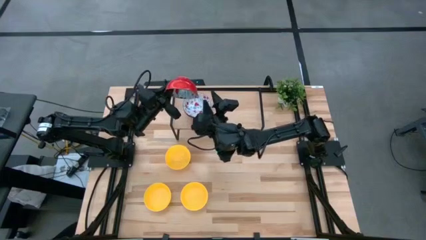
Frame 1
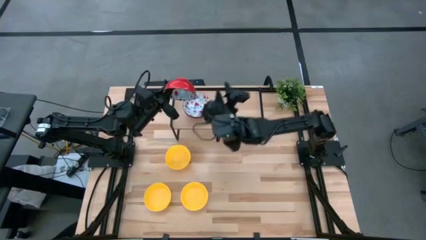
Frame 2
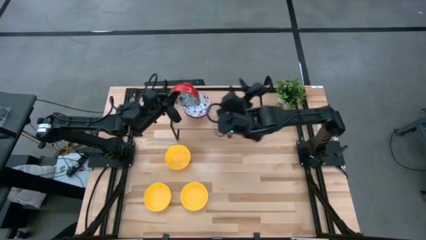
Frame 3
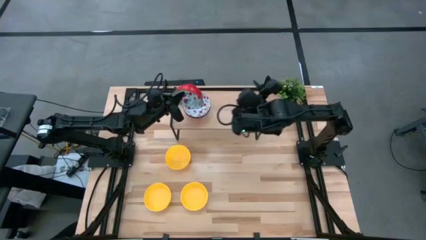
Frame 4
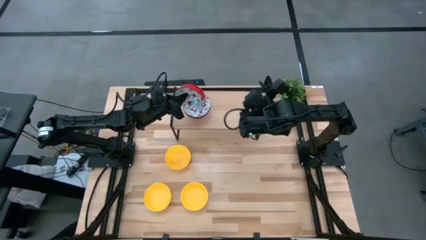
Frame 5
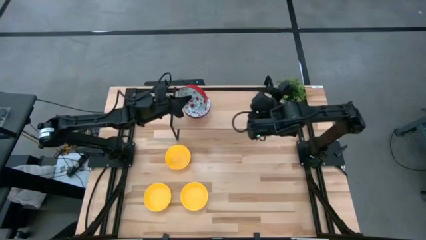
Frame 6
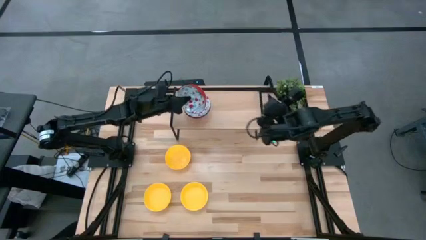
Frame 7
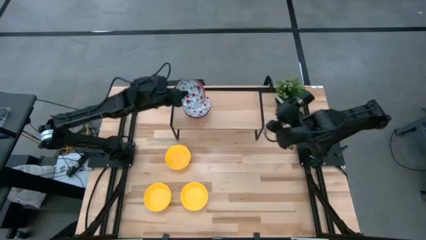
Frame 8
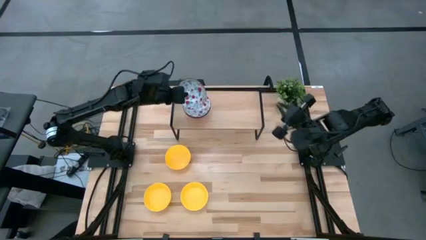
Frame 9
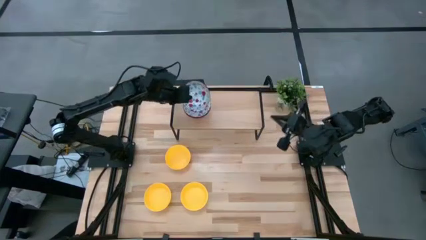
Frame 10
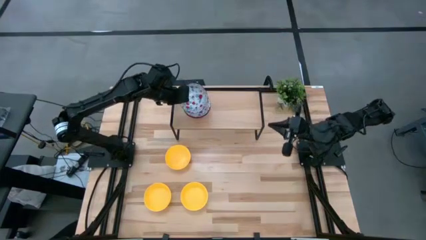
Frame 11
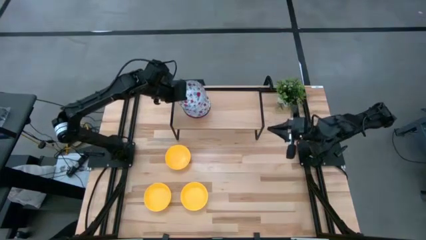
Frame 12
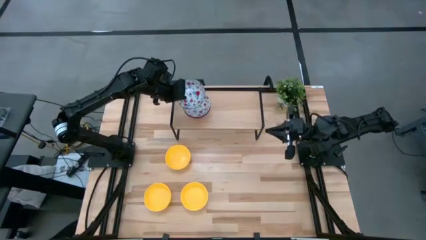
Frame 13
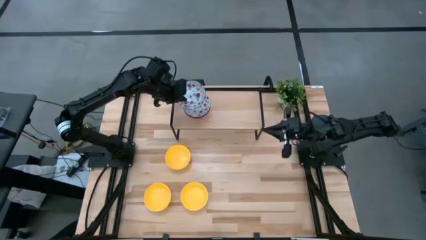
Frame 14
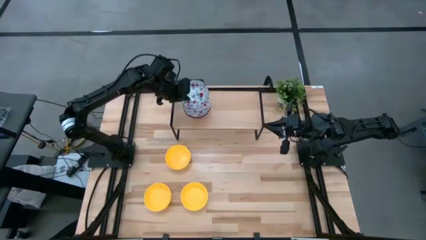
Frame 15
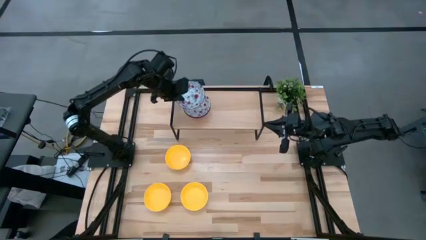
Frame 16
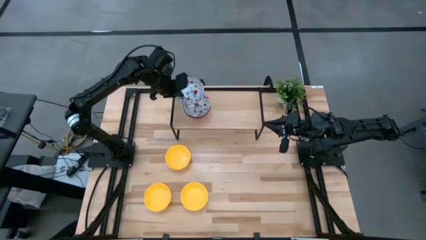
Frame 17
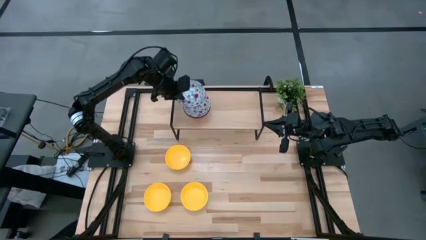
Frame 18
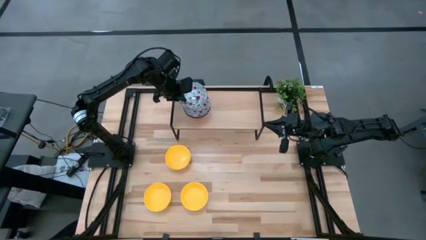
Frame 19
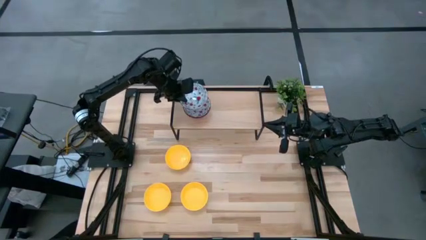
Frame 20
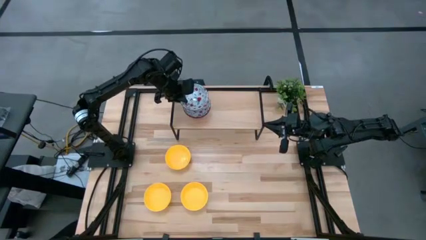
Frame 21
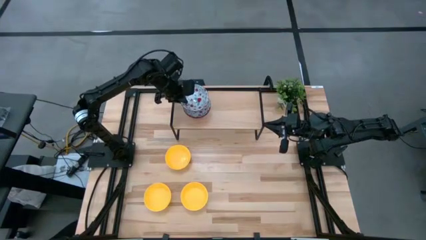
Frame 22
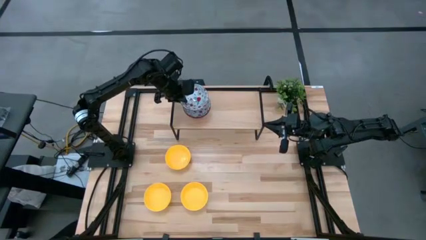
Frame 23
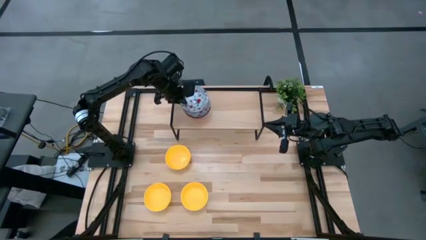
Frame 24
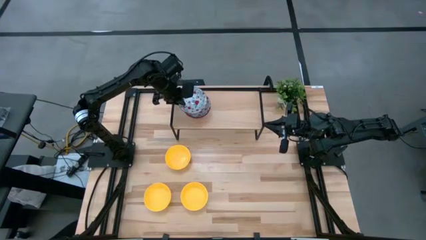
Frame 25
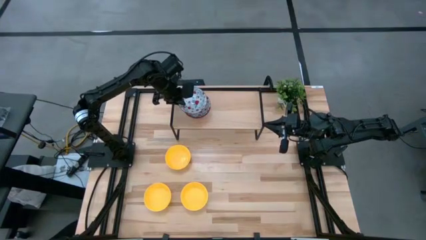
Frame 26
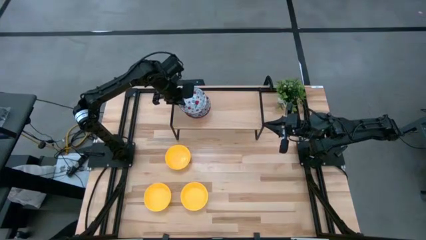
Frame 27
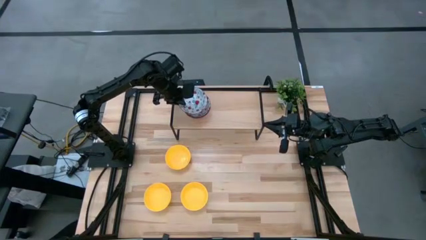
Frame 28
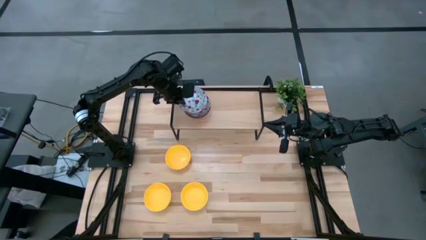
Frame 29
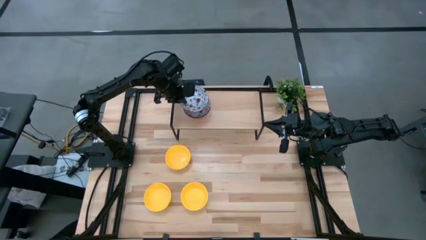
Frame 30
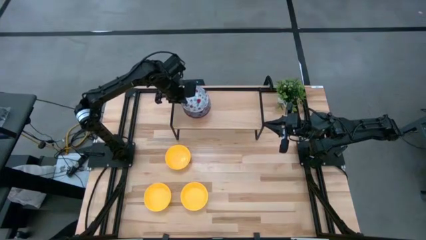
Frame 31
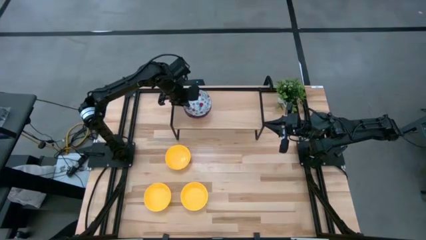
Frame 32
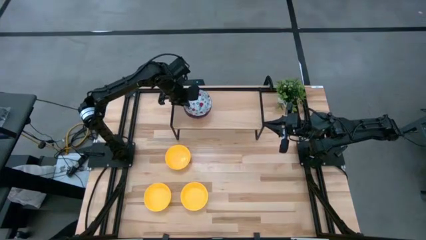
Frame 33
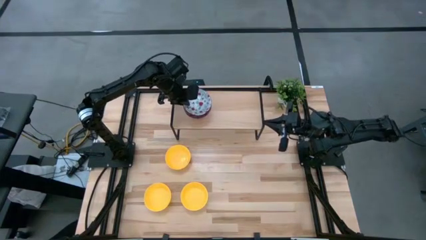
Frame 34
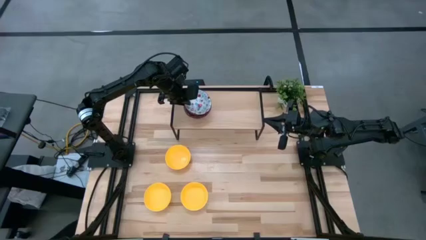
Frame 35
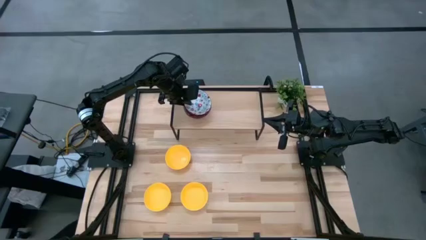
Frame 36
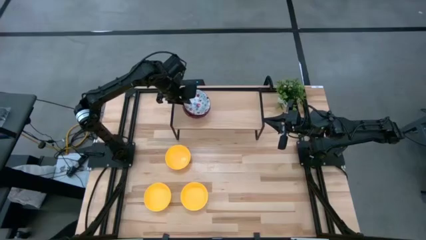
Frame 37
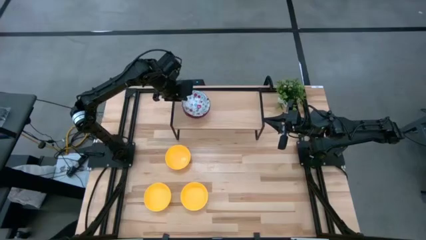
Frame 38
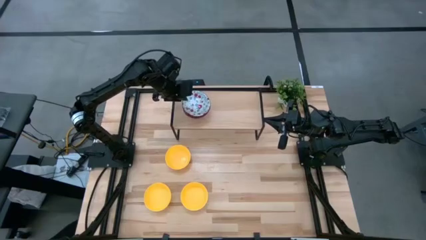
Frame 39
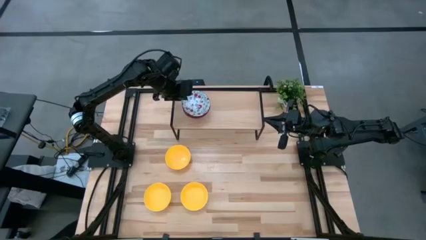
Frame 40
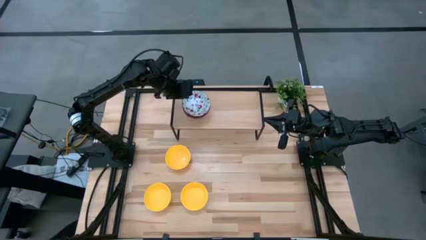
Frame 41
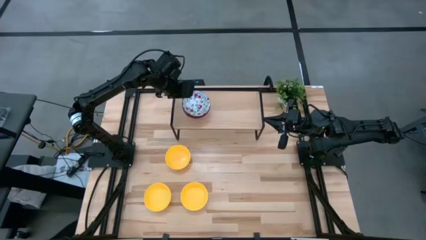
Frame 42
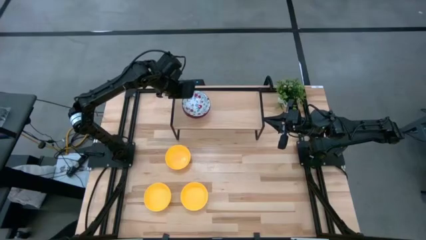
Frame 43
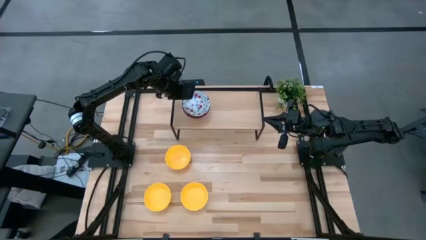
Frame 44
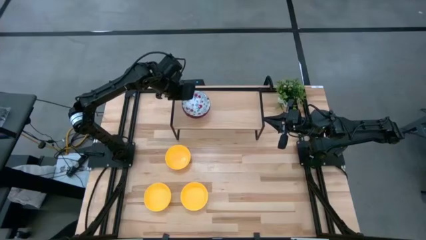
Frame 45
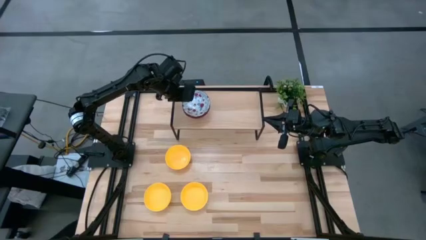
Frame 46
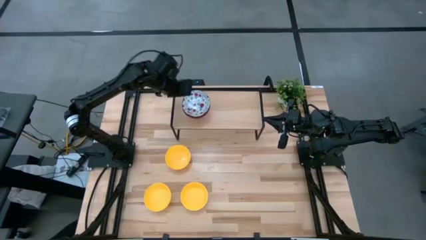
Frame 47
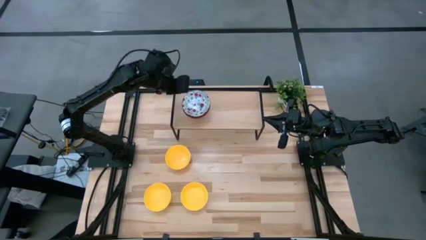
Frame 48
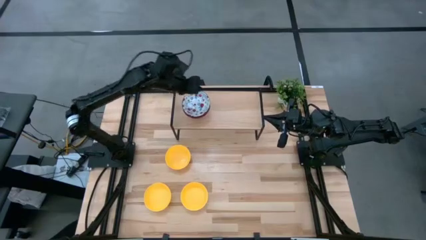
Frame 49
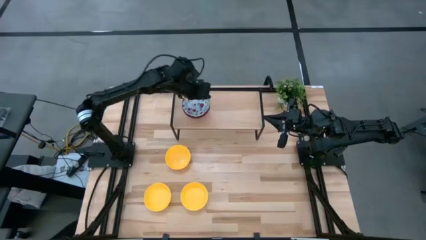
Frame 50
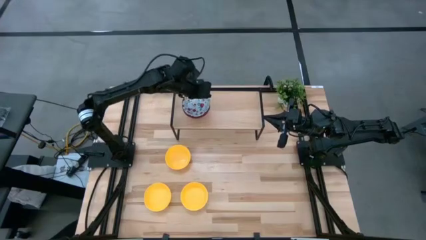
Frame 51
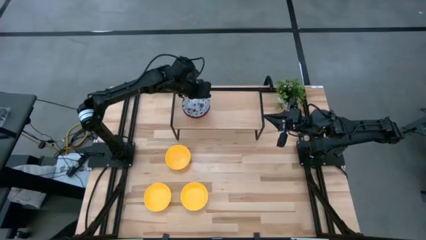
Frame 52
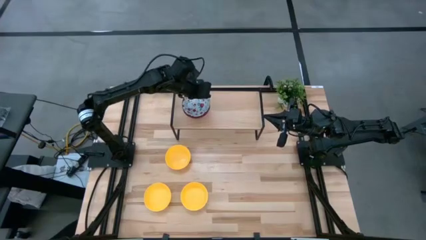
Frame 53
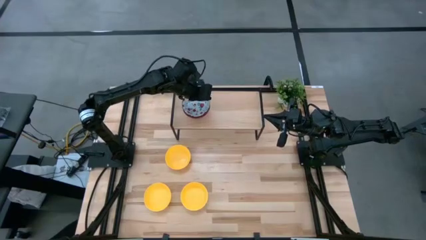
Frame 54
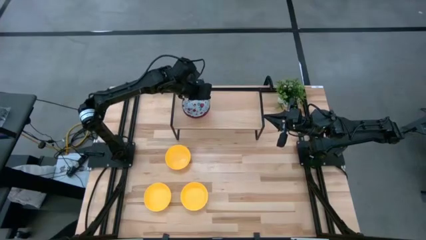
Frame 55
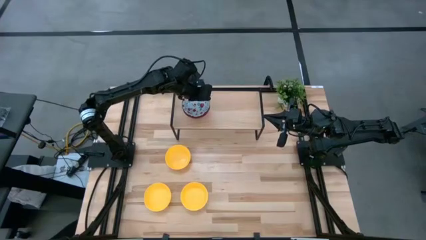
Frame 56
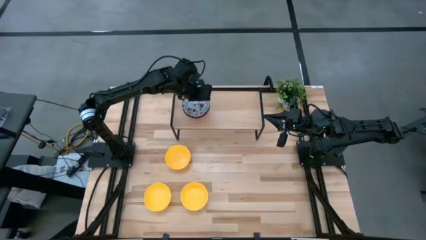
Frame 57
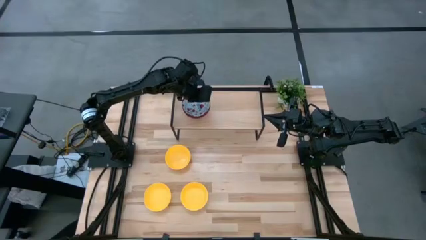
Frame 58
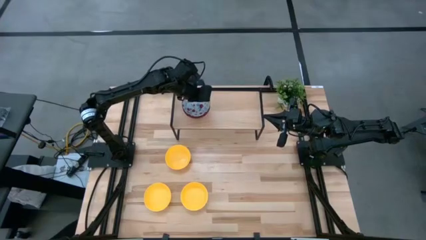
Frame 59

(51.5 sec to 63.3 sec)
Task: Pick & Place Mini bowls
Stack the red bowl on the red bowl on the shelf
